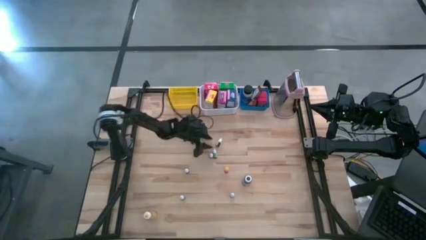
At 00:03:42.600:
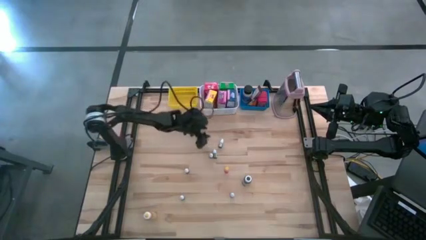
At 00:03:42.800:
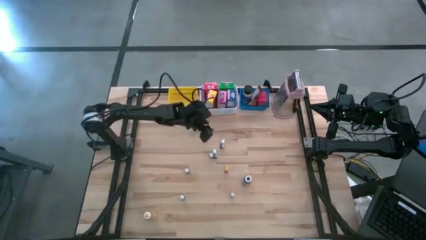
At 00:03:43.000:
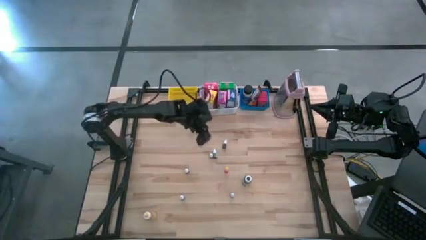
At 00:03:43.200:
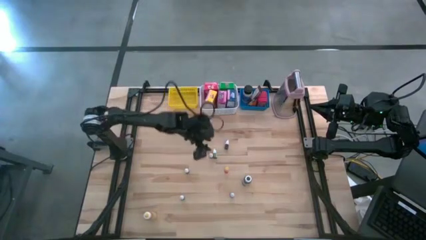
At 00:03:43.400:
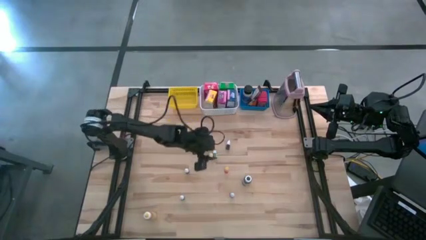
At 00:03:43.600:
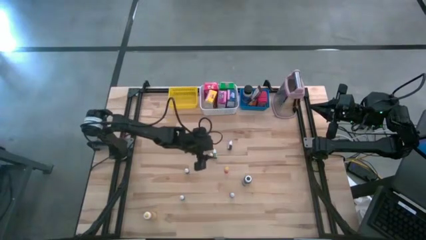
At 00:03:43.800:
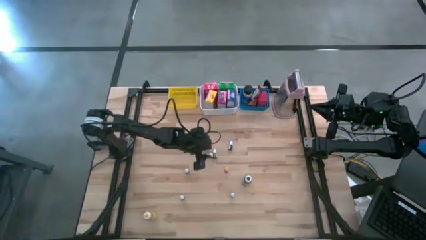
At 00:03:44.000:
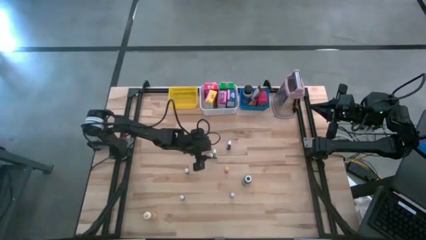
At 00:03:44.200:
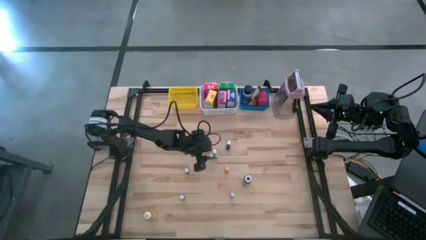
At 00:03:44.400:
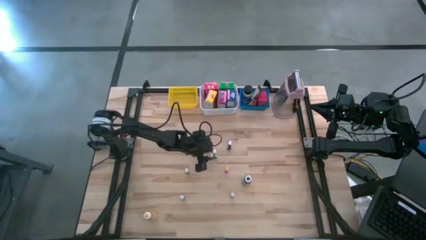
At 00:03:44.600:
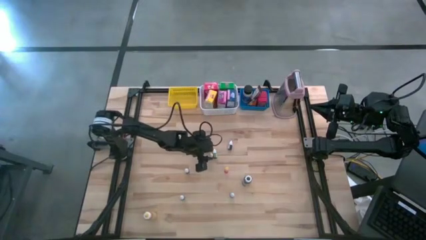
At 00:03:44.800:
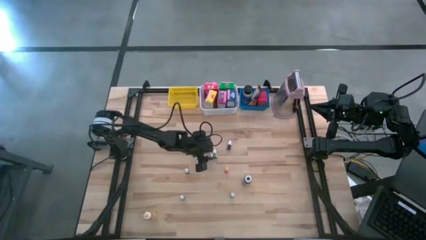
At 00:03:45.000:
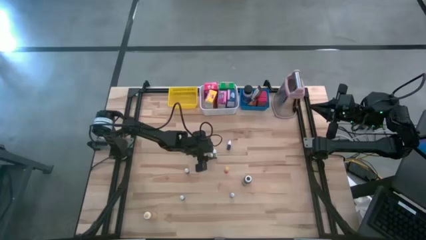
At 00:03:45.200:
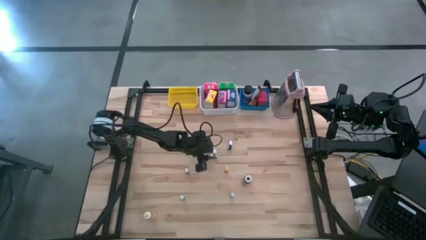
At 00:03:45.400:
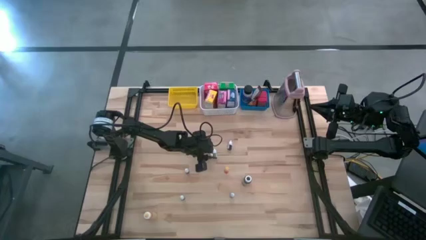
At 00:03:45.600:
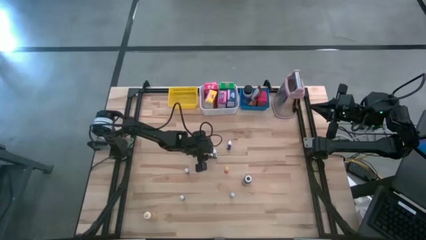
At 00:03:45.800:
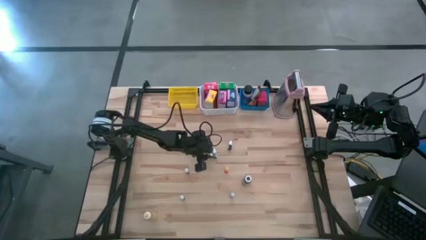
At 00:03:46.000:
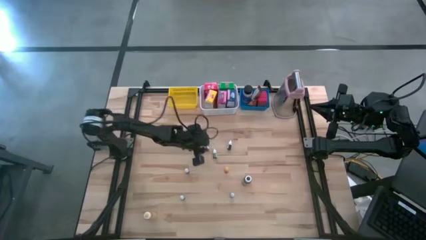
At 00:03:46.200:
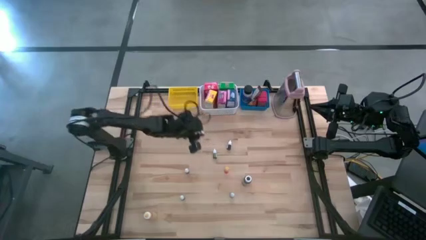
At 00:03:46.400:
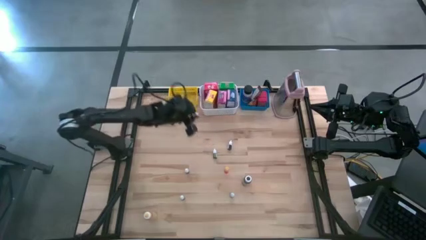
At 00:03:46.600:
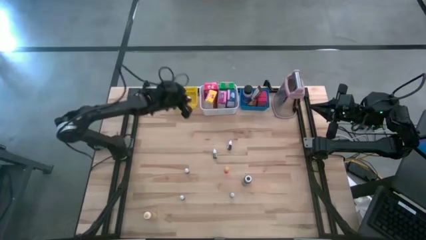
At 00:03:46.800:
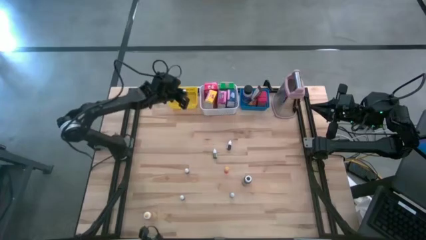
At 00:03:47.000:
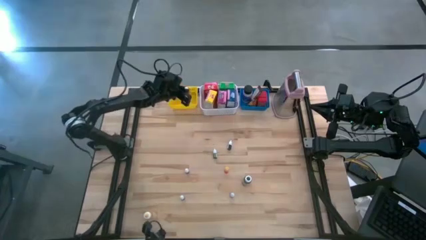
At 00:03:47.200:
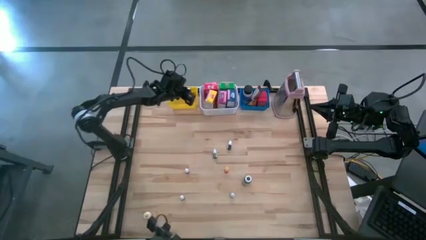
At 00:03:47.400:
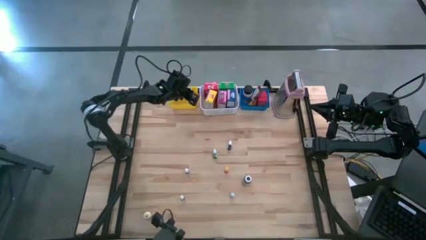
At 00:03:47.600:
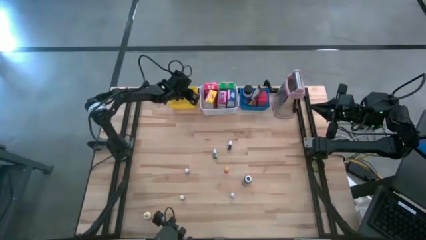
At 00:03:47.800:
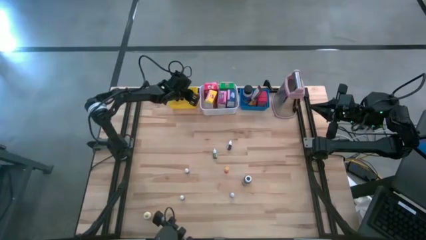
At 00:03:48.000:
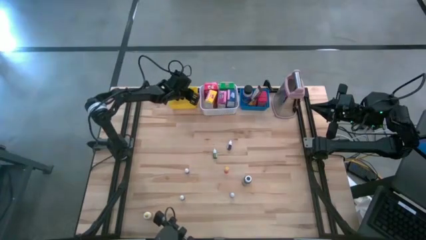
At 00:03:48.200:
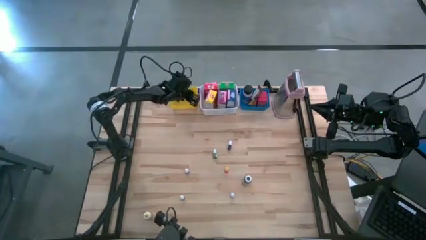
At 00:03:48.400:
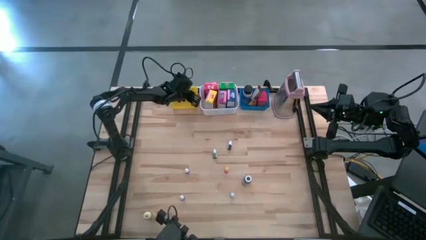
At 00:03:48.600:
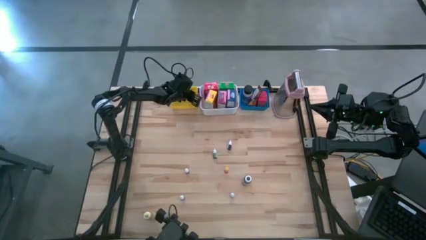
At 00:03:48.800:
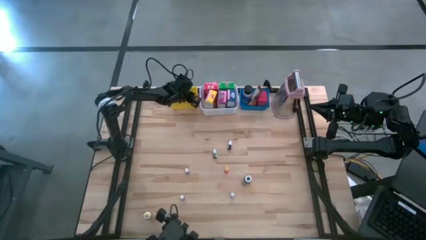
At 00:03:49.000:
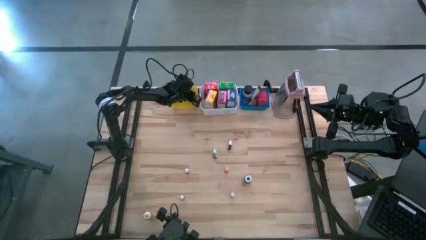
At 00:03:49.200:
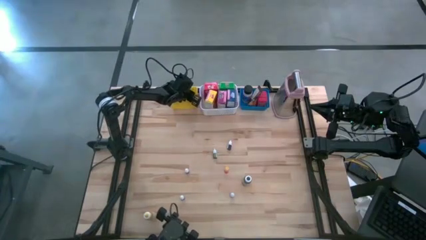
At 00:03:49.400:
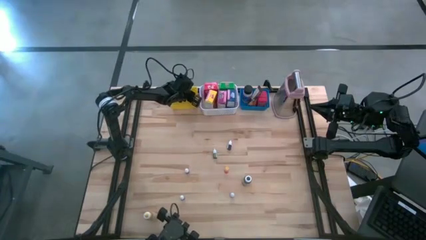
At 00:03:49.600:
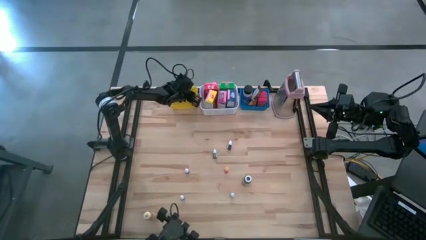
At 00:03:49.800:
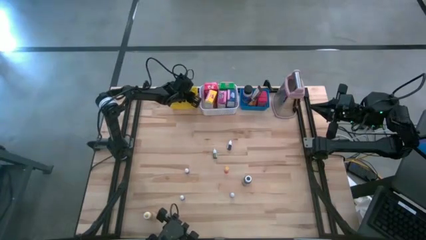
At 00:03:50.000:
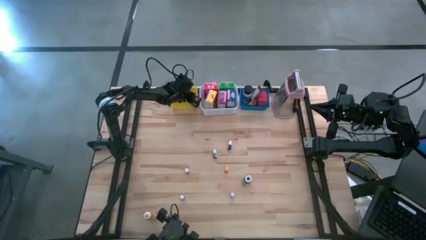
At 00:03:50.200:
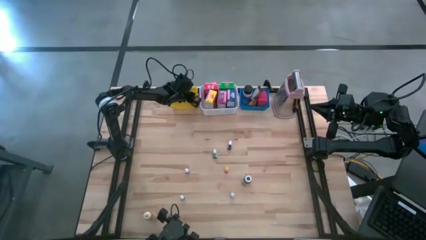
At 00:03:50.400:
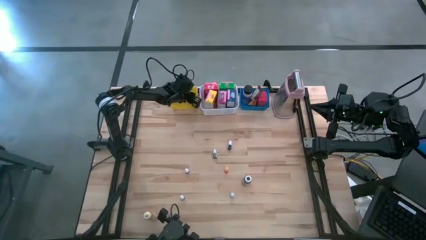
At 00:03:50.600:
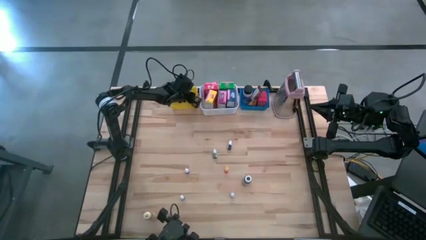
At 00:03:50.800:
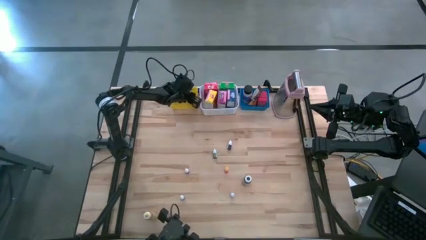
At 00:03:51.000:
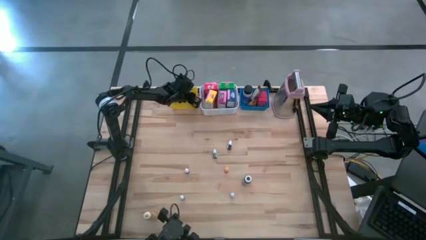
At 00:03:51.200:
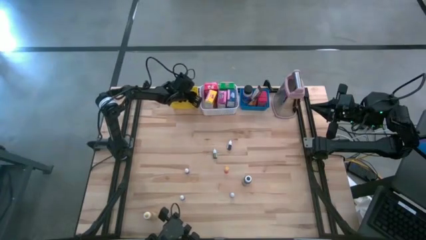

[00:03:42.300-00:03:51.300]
Task: Pick & Place Kitchen Items
Put the black food coloring bottle into the yellow basket

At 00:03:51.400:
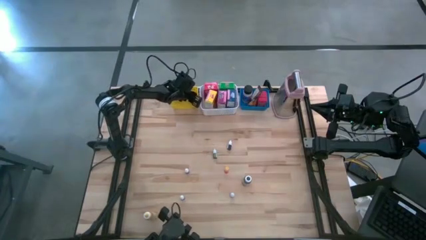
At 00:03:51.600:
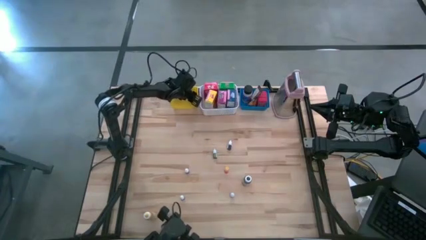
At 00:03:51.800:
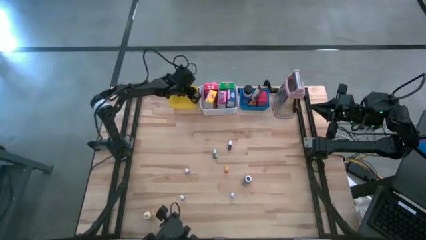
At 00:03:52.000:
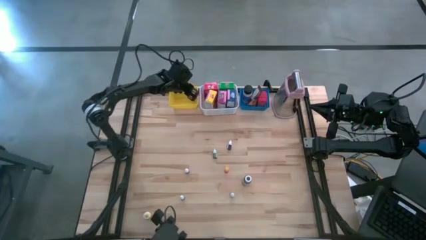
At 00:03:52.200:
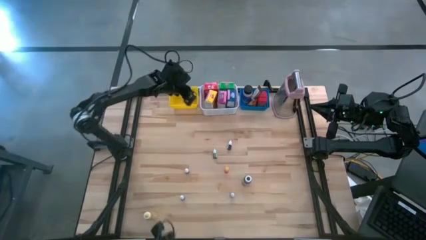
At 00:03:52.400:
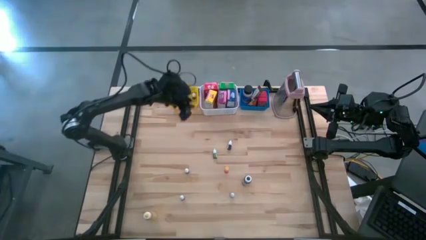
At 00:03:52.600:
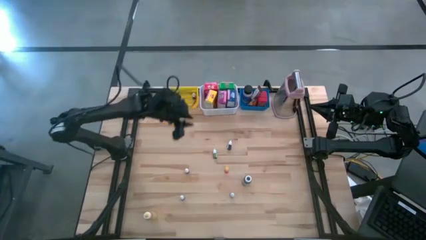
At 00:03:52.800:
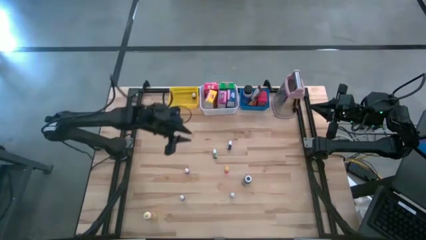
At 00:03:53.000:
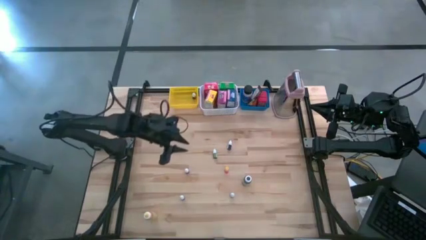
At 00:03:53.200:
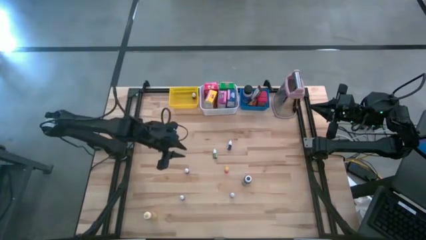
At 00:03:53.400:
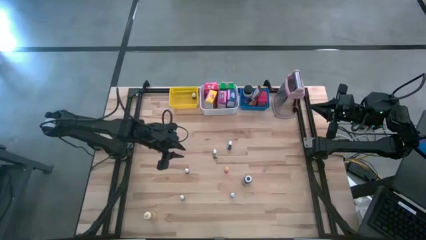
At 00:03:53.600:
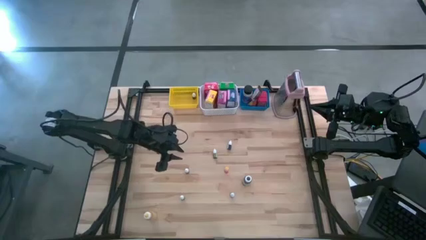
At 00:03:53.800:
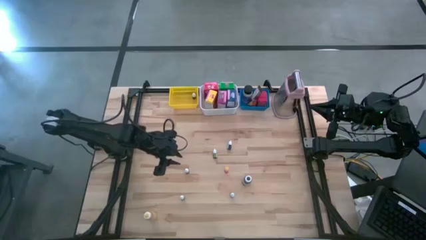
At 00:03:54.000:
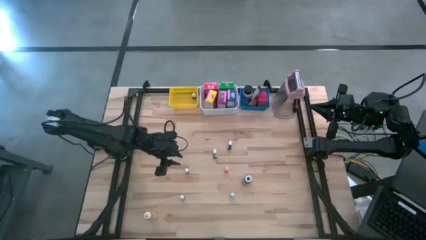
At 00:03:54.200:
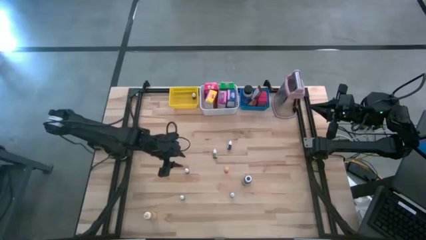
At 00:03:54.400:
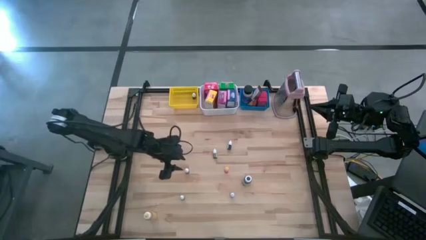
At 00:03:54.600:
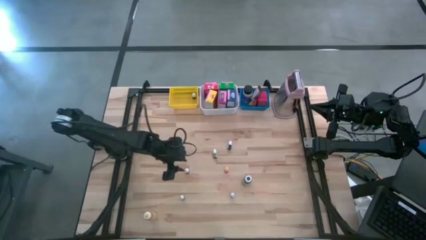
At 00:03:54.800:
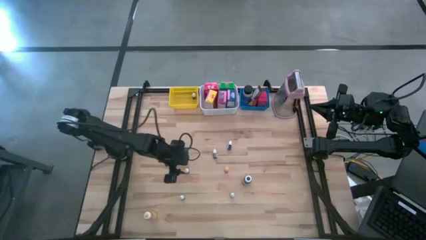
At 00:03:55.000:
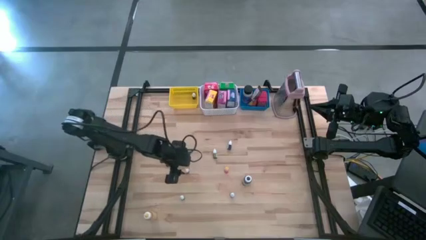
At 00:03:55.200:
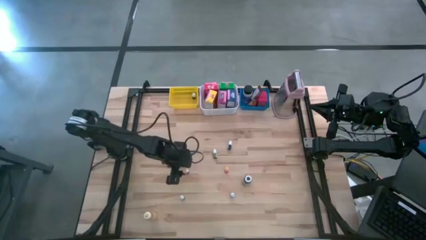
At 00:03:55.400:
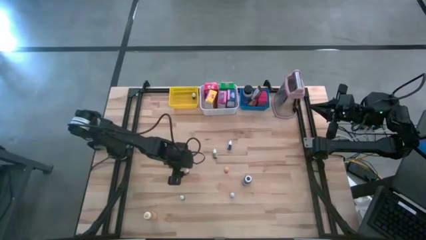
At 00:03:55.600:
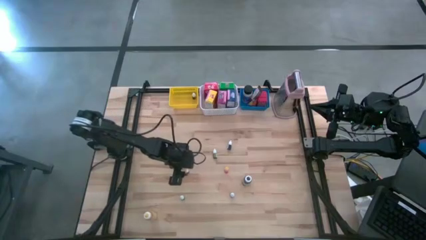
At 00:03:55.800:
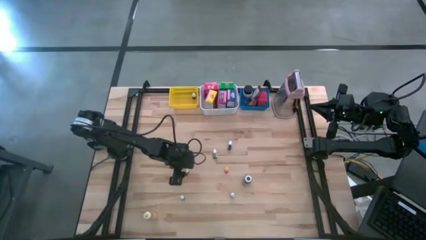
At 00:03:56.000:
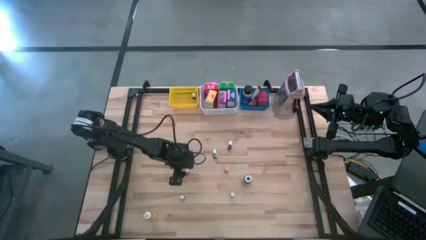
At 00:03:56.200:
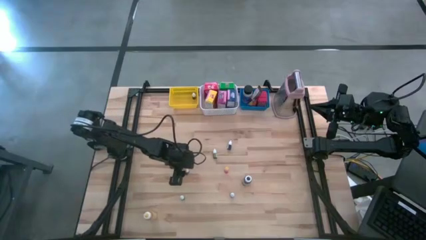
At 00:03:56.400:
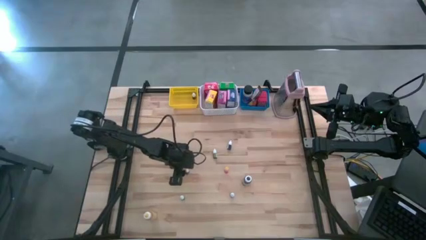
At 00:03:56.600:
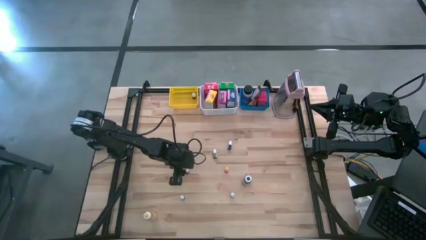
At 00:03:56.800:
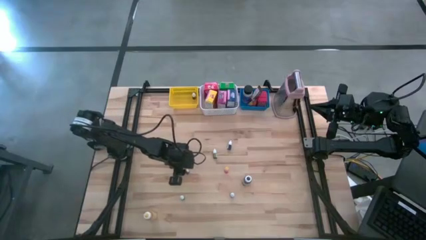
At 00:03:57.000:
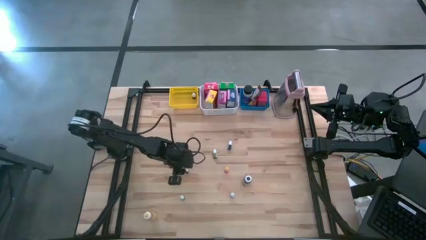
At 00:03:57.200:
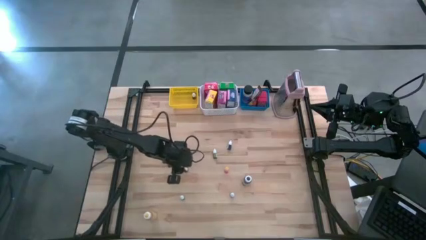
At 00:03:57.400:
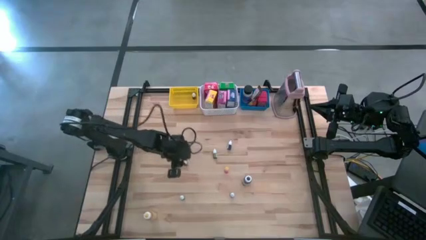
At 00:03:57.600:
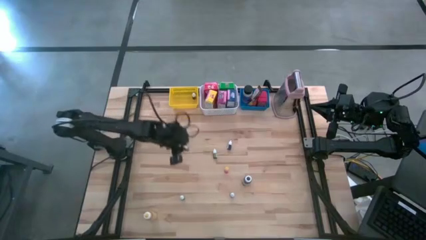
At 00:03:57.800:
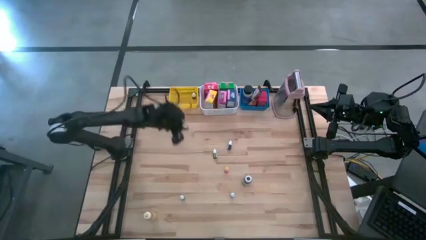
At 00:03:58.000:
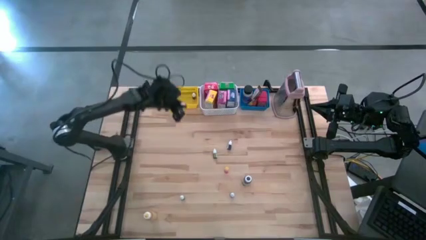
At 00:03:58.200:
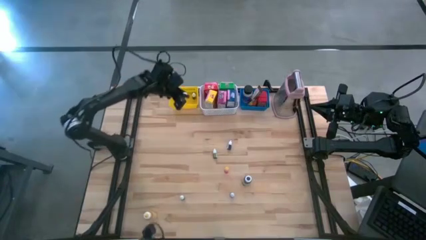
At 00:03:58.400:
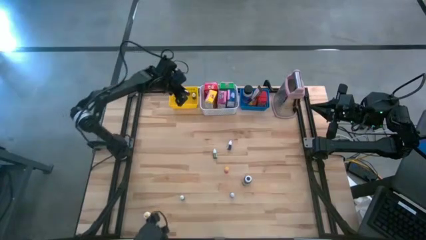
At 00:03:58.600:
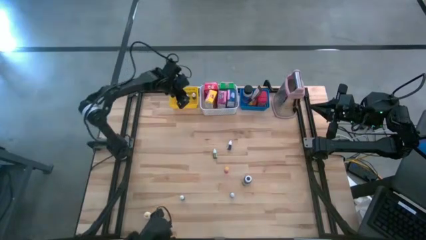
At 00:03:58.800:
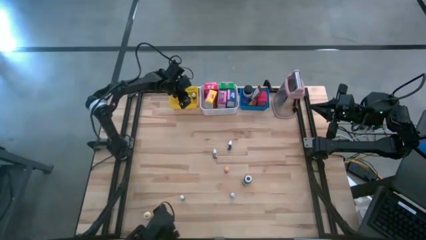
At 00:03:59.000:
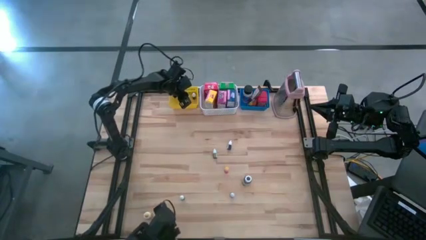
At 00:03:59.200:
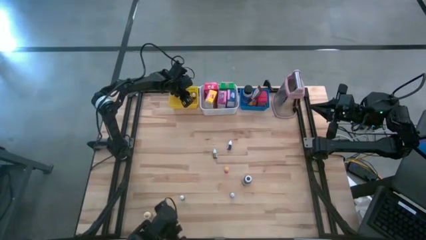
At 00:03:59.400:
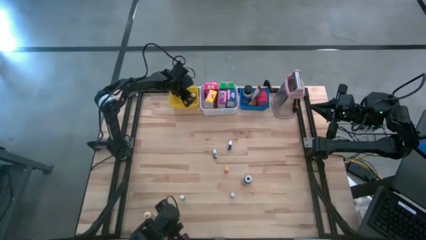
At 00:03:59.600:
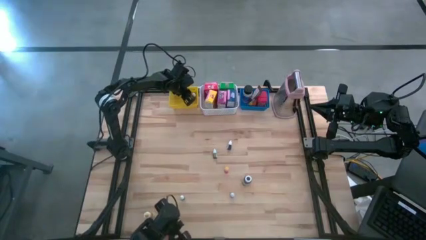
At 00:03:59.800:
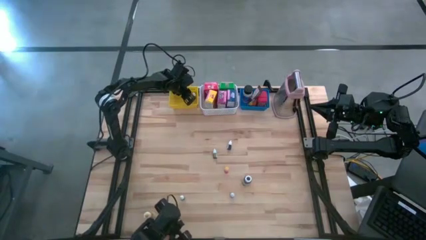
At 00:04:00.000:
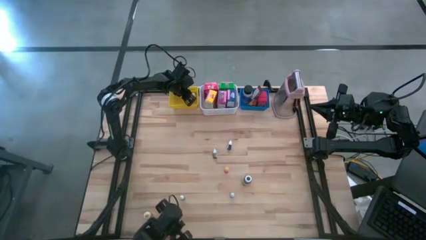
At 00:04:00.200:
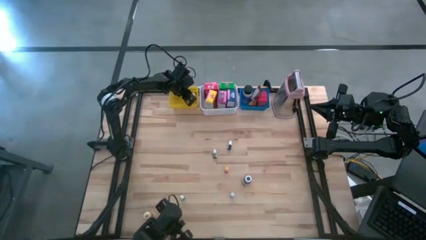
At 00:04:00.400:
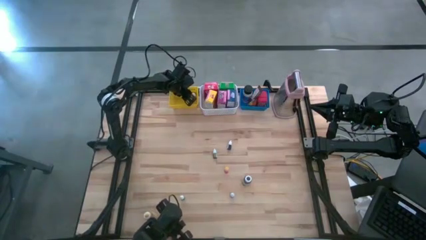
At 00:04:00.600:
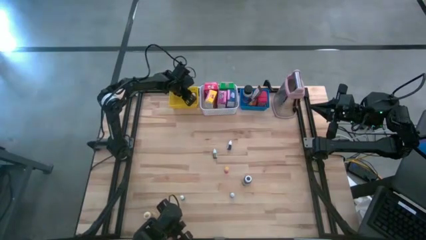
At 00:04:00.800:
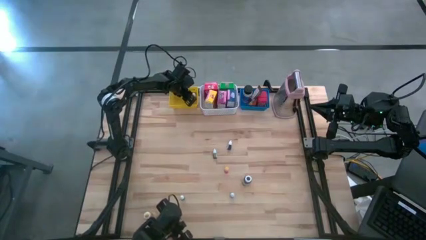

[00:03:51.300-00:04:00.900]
Put the orange food coloring bottle into the yellow basket
